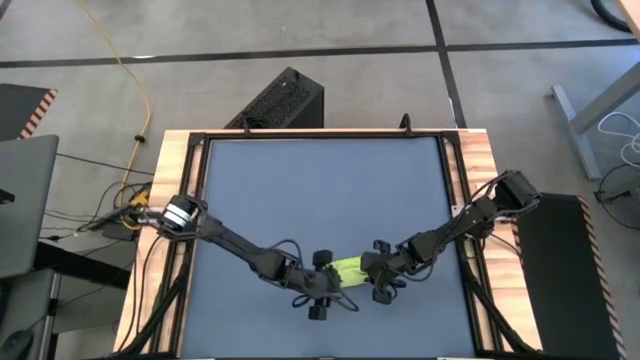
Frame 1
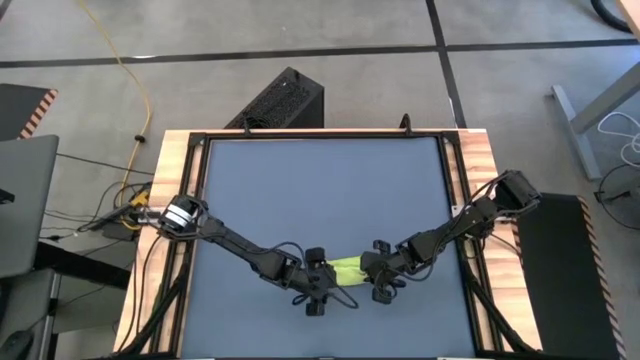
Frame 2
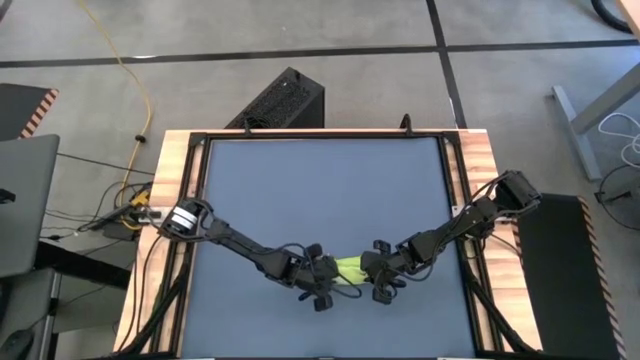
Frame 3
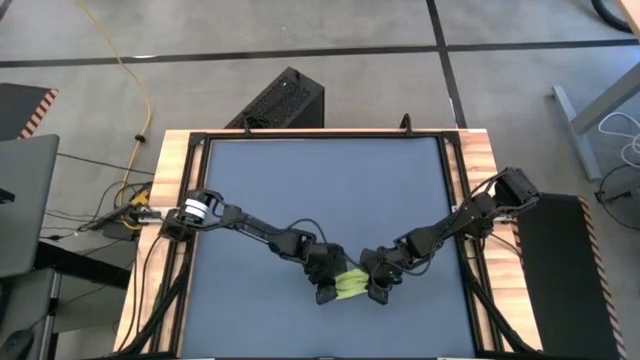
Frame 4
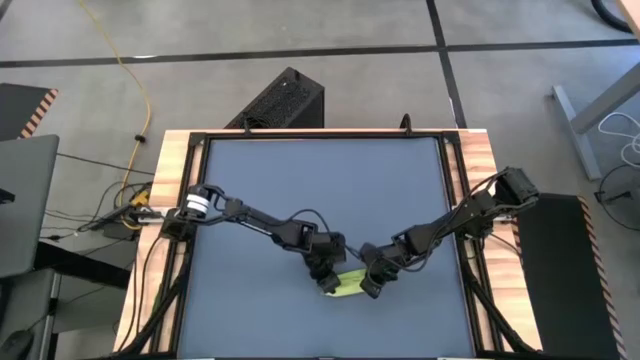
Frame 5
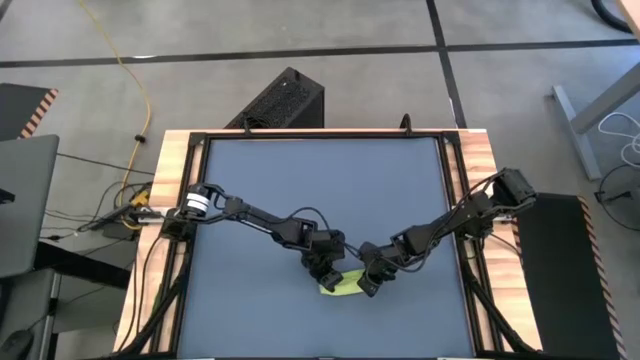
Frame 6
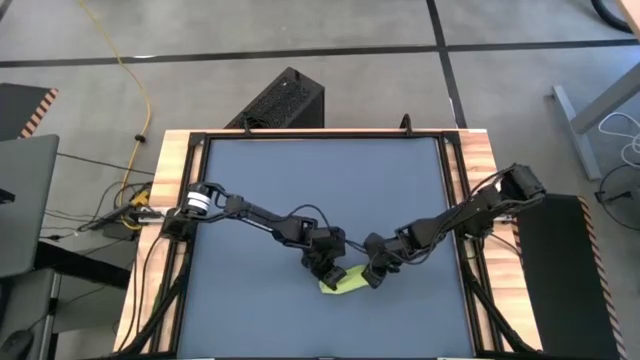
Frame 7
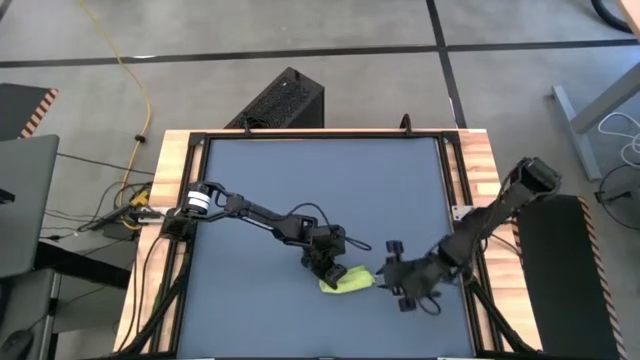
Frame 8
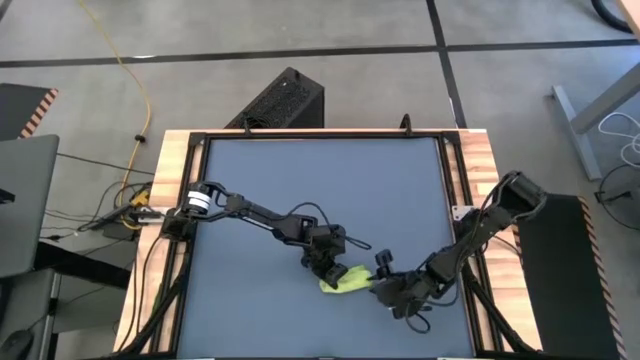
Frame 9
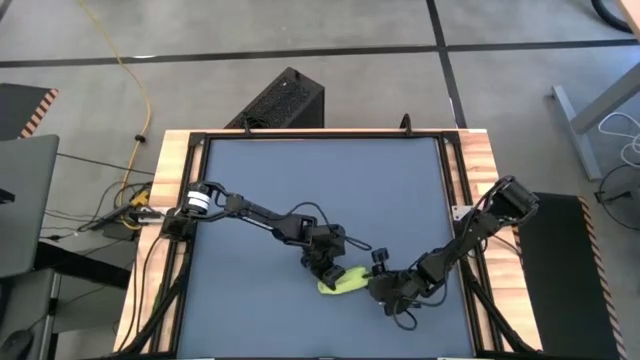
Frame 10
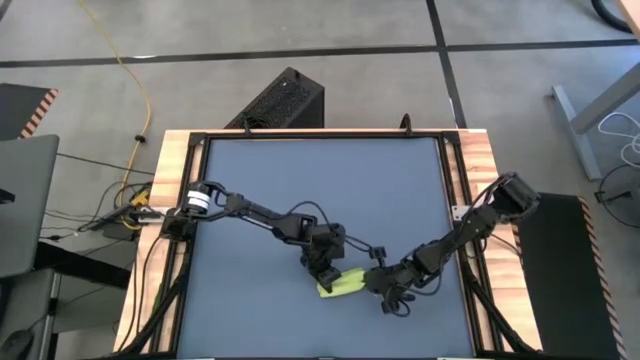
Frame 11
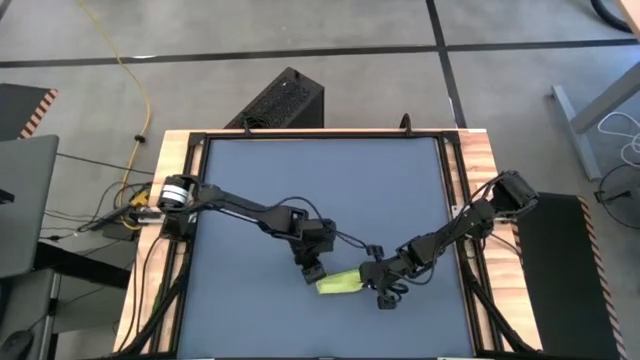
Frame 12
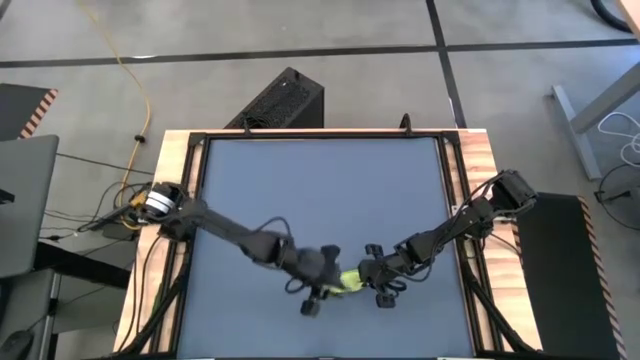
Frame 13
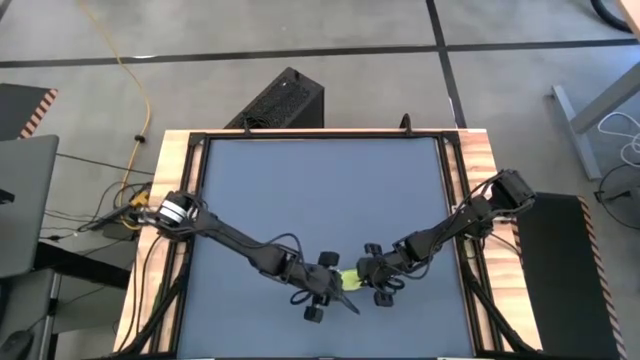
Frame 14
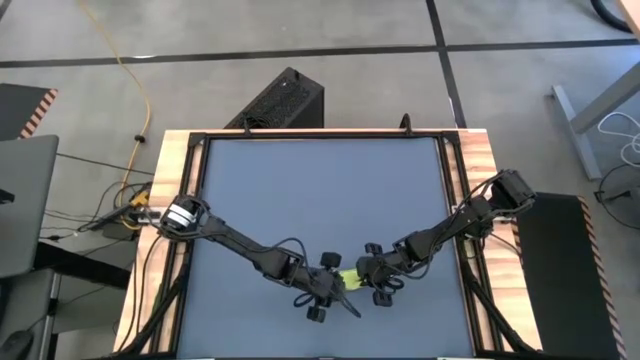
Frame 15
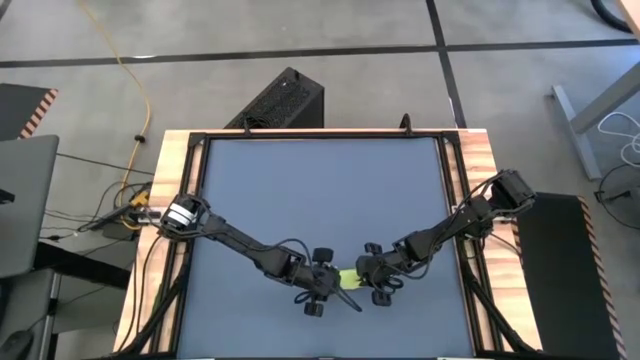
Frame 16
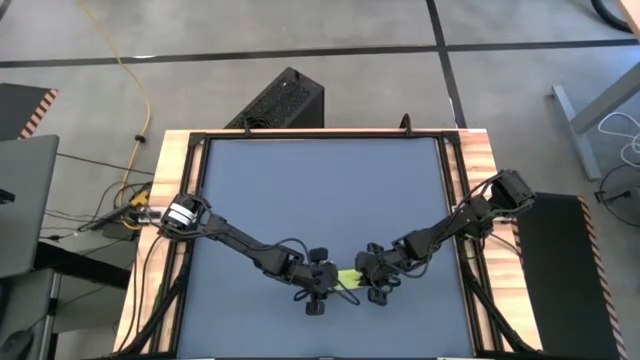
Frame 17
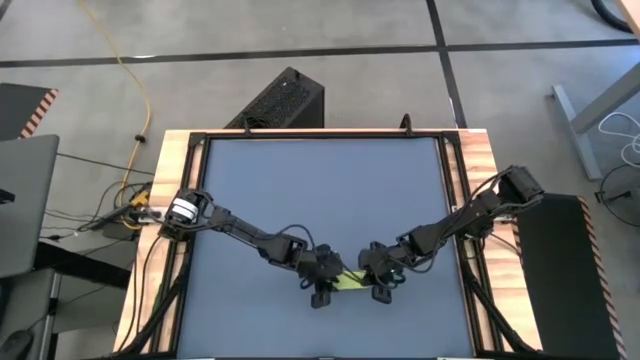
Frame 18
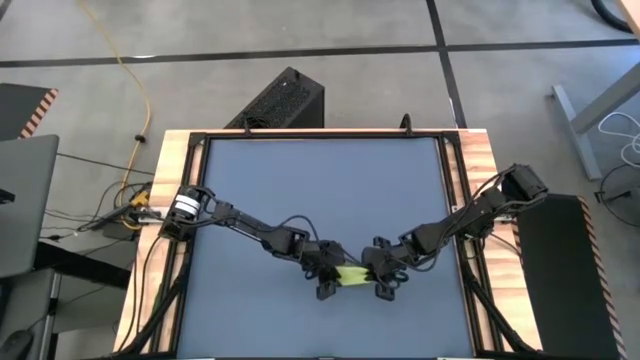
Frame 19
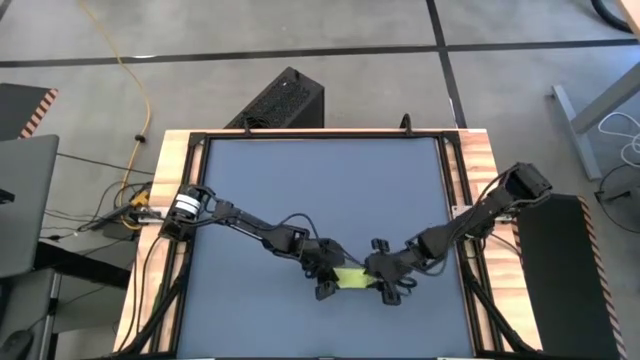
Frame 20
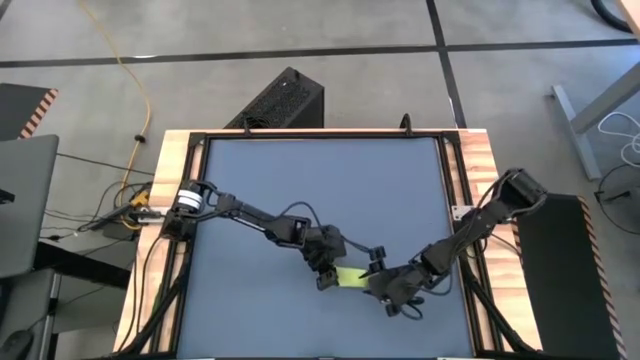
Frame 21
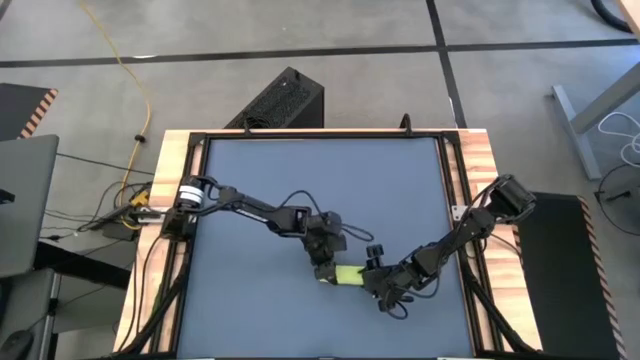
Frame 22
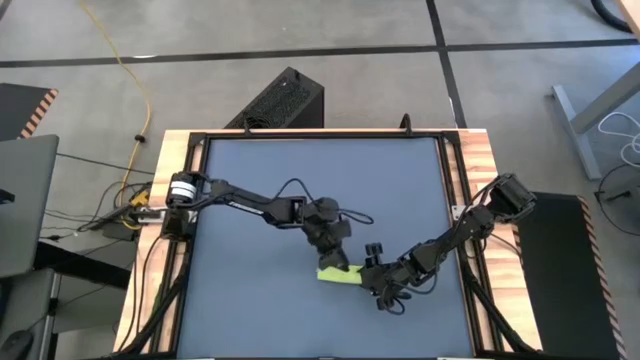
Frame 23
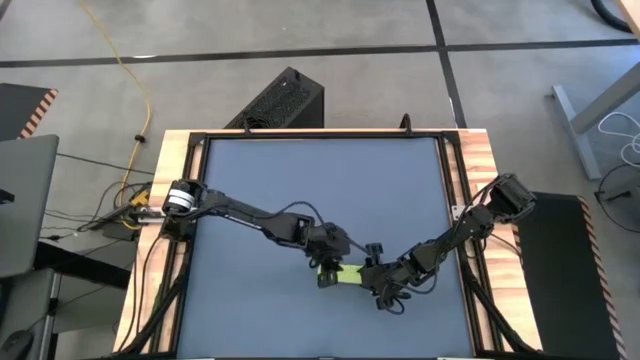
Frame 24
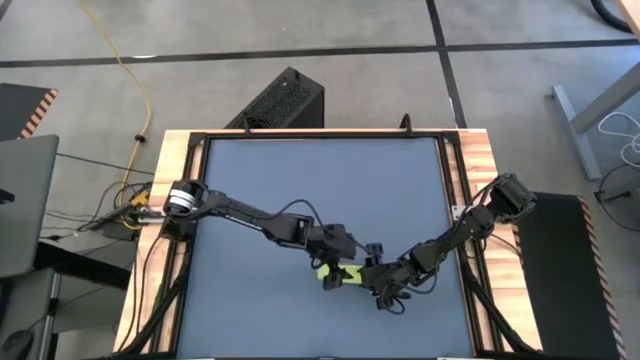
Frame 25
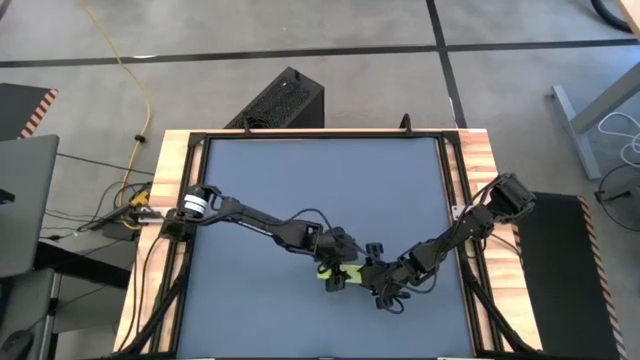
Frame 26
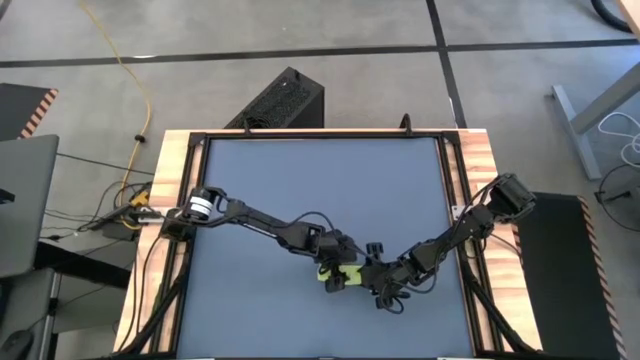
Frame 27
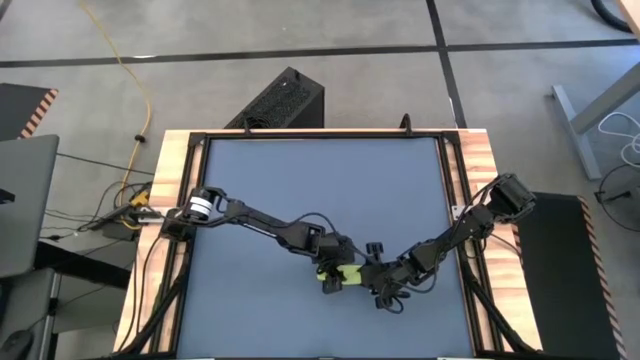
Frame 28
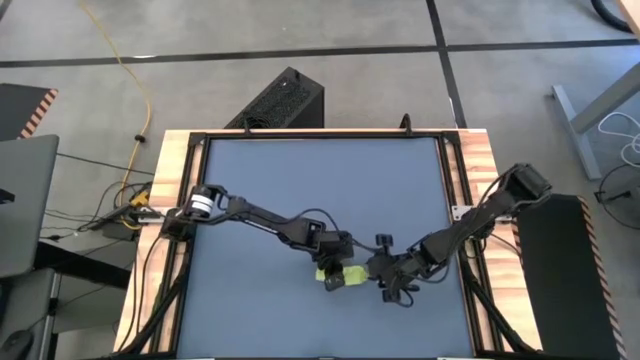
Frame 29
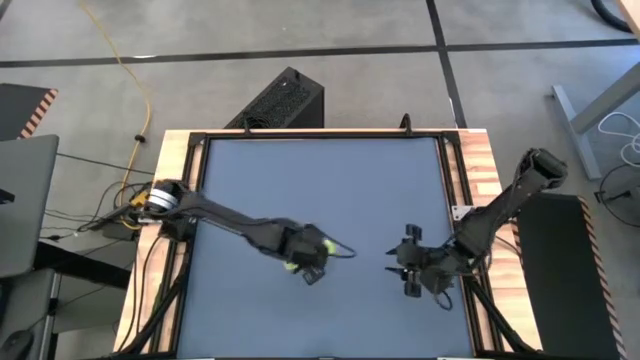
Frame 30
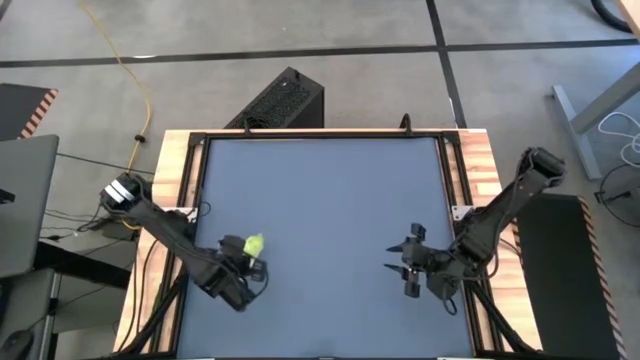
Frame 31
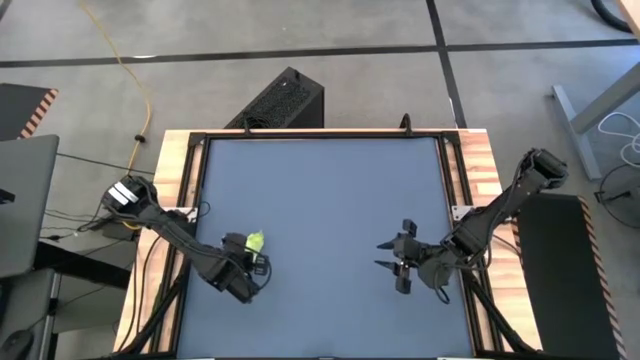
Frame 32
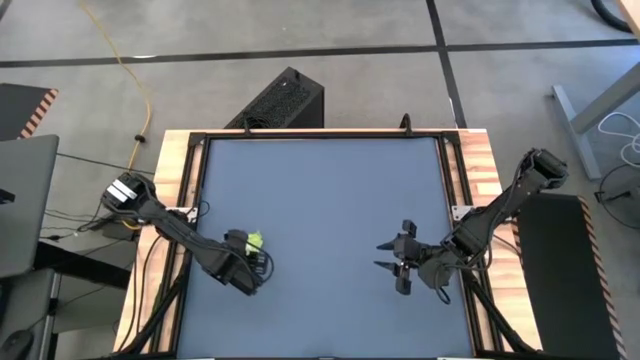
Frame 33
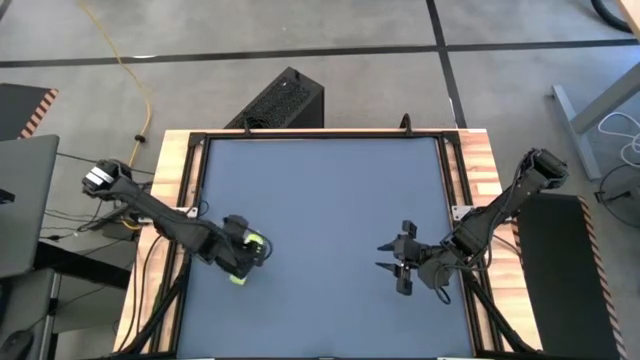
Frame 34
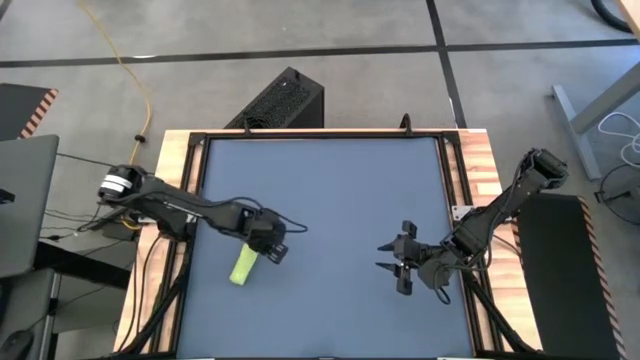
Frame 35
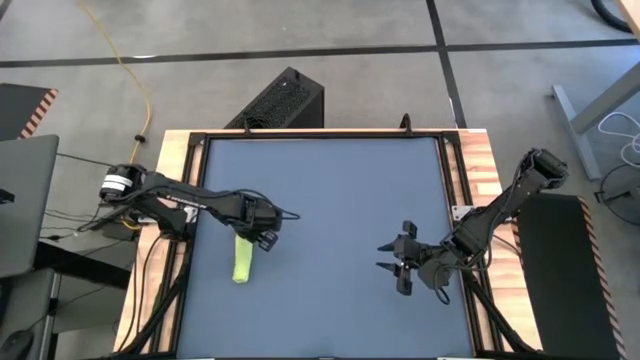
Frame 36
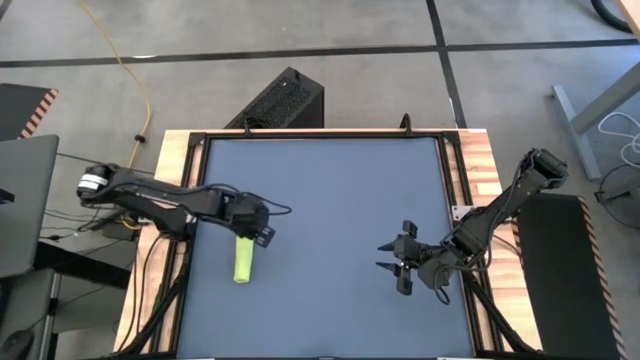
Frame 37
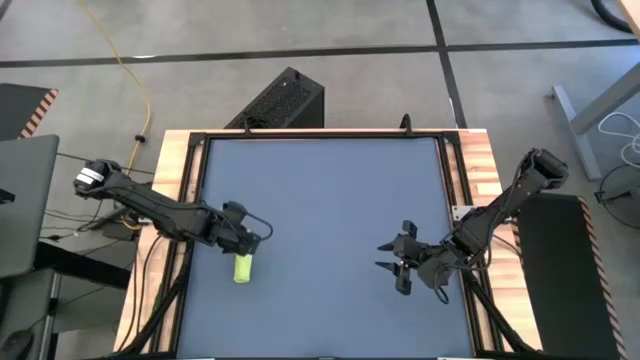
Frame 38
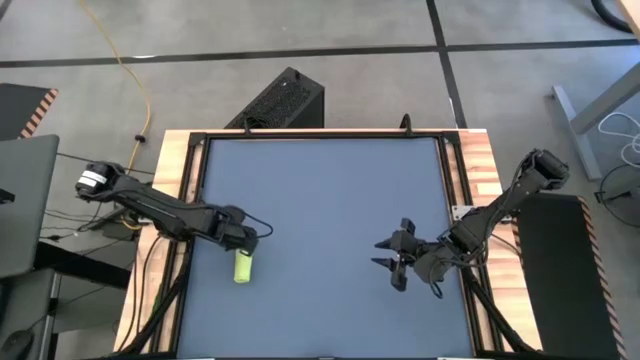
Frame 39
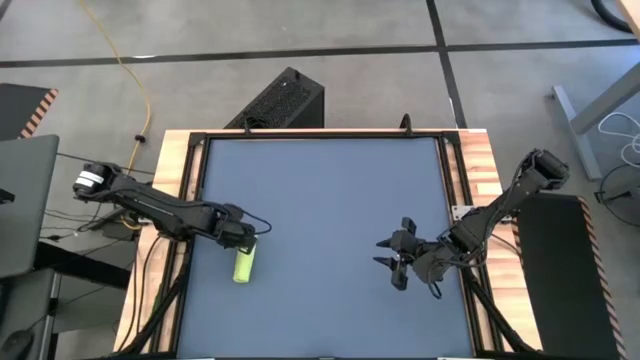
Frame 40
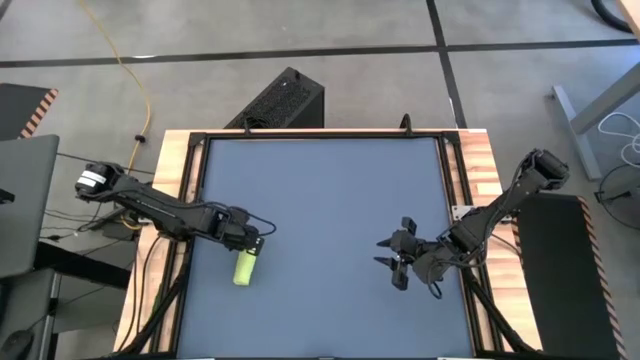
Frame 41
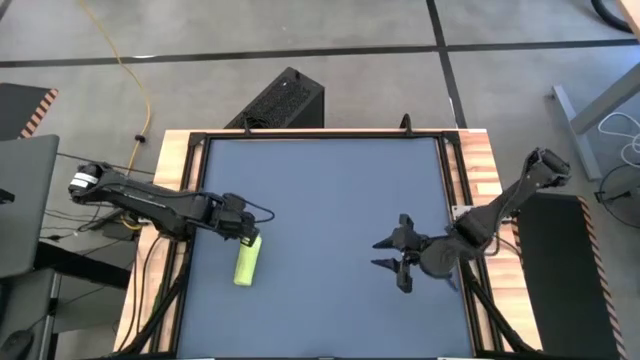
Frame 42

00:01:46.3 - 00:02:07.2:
Task: Roll towel into tight, uniform cylinder
Roll the green towel
